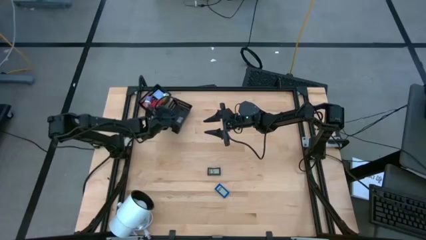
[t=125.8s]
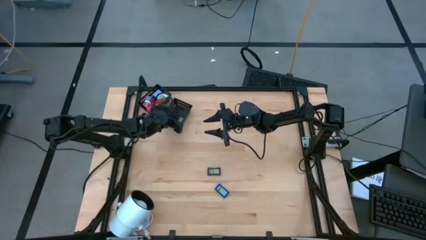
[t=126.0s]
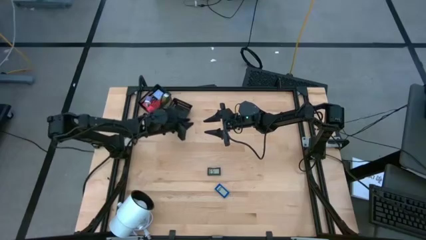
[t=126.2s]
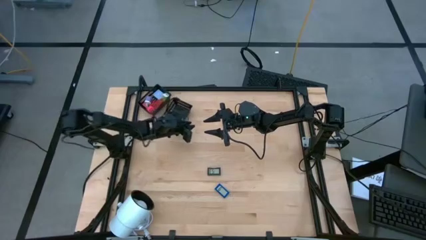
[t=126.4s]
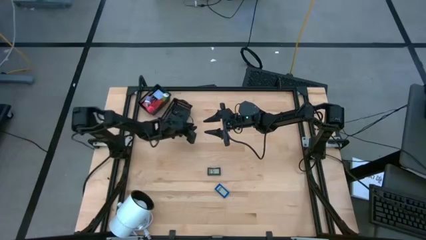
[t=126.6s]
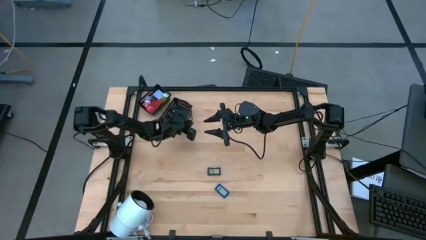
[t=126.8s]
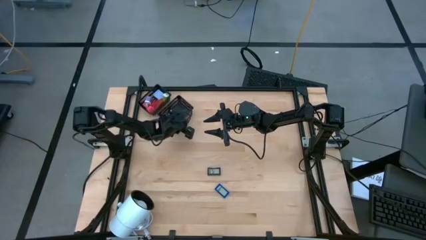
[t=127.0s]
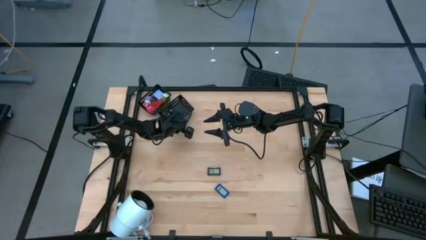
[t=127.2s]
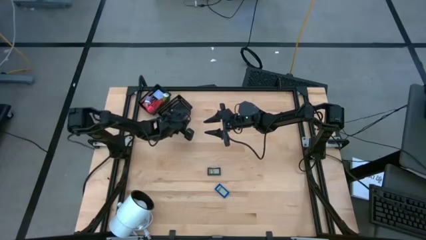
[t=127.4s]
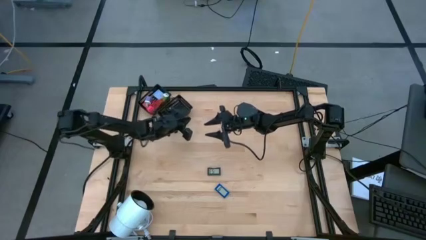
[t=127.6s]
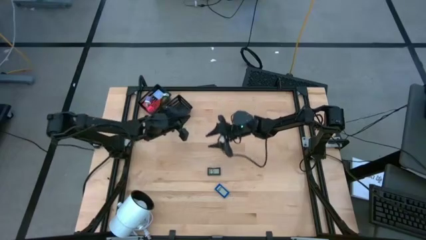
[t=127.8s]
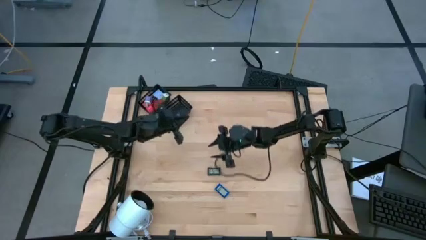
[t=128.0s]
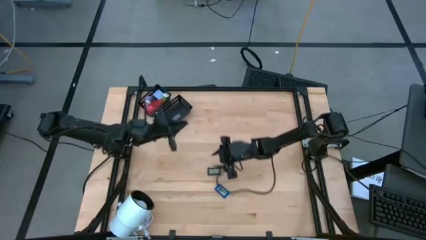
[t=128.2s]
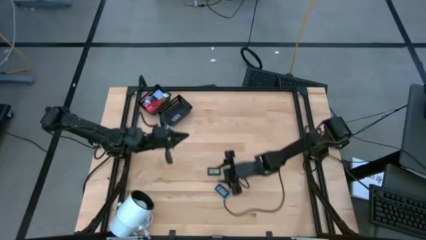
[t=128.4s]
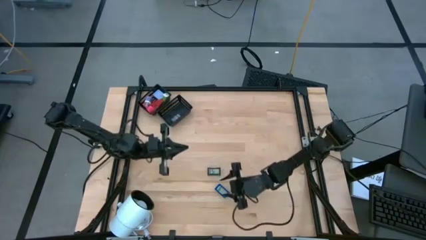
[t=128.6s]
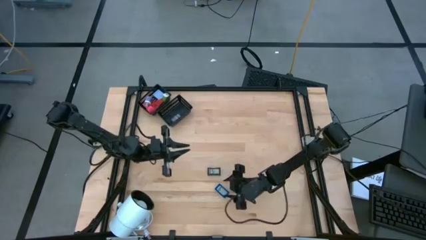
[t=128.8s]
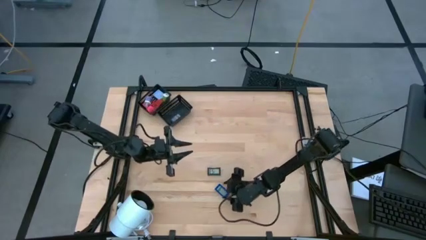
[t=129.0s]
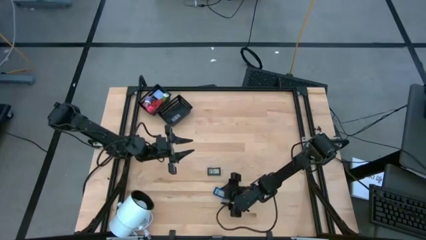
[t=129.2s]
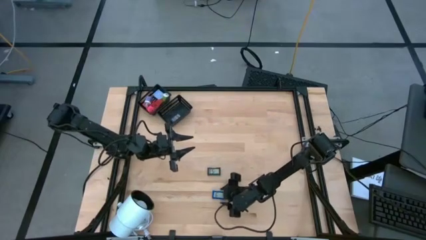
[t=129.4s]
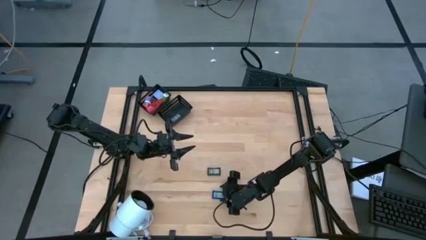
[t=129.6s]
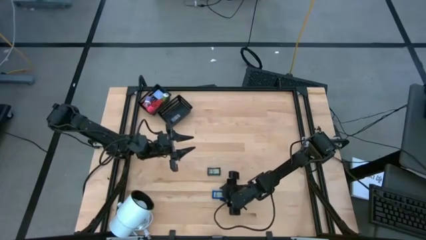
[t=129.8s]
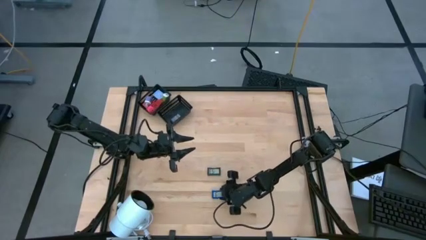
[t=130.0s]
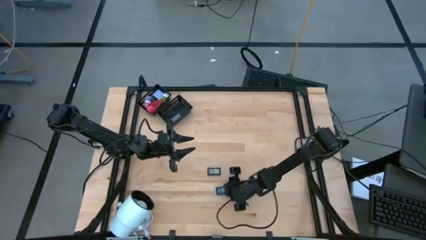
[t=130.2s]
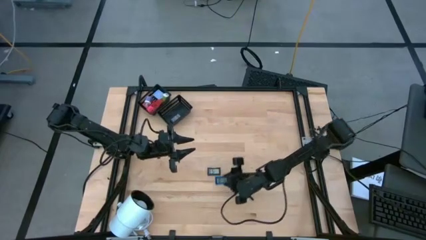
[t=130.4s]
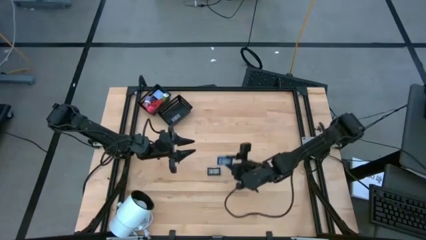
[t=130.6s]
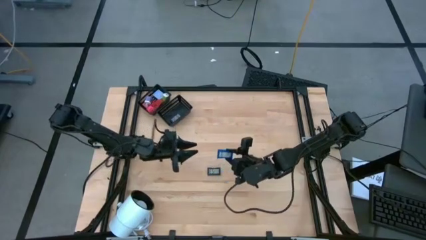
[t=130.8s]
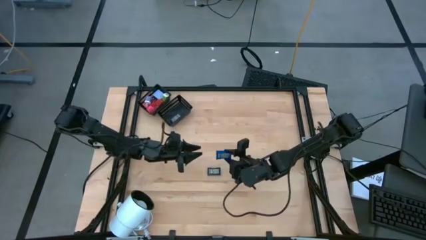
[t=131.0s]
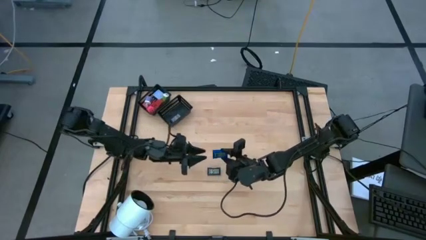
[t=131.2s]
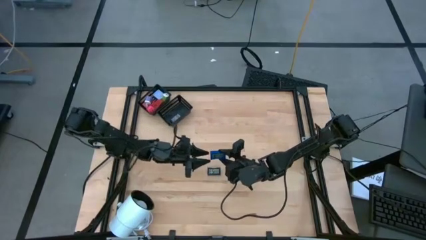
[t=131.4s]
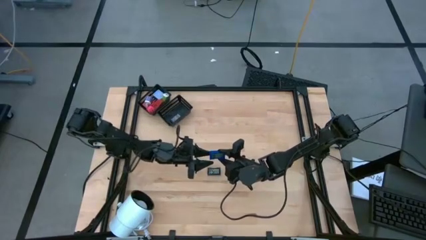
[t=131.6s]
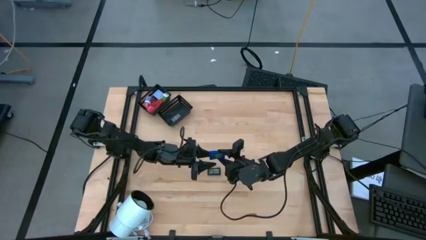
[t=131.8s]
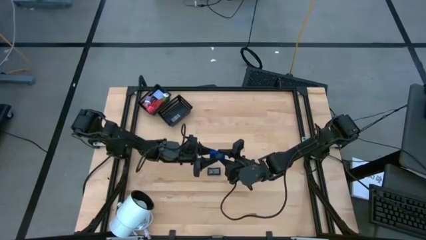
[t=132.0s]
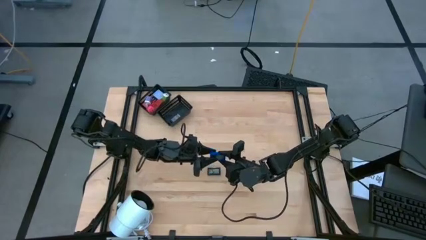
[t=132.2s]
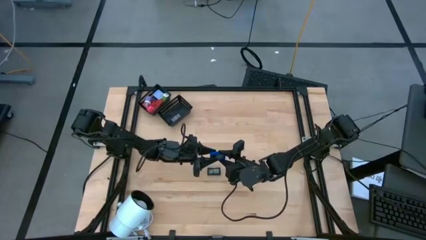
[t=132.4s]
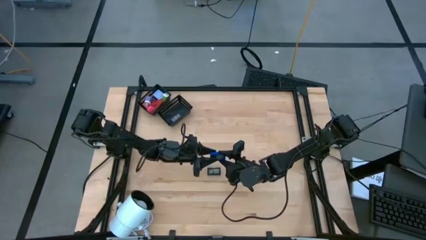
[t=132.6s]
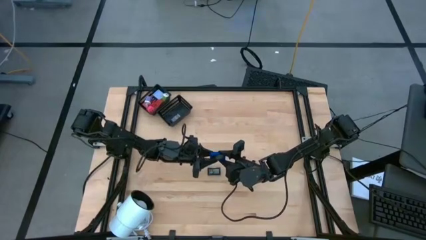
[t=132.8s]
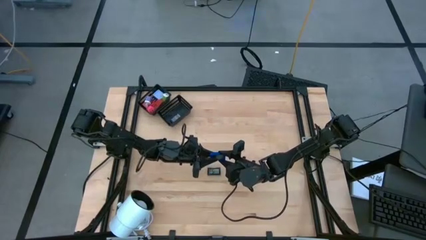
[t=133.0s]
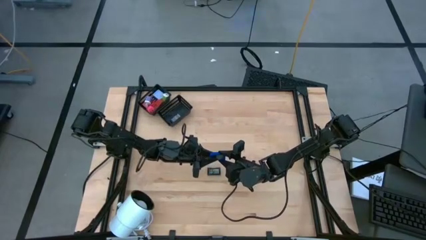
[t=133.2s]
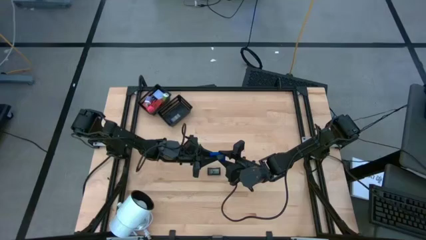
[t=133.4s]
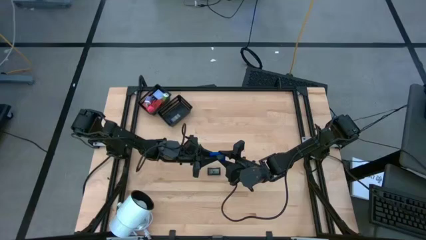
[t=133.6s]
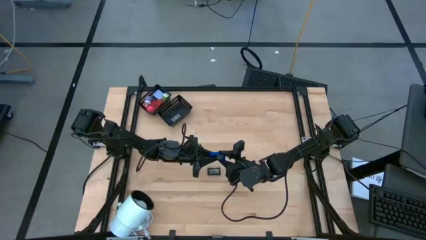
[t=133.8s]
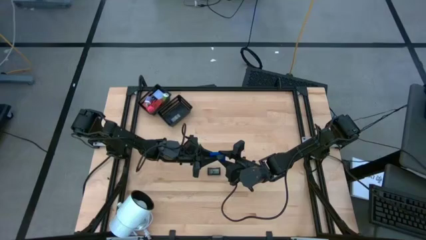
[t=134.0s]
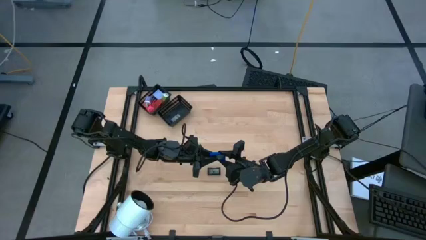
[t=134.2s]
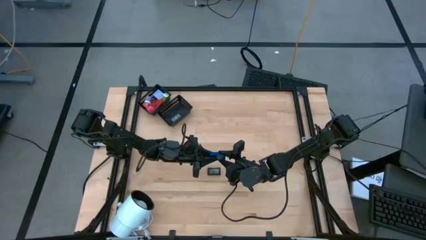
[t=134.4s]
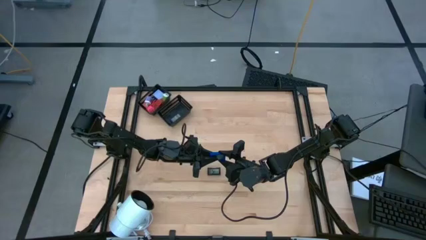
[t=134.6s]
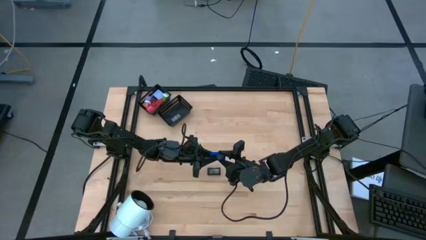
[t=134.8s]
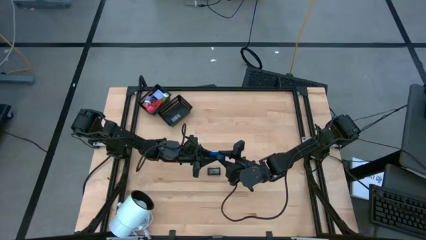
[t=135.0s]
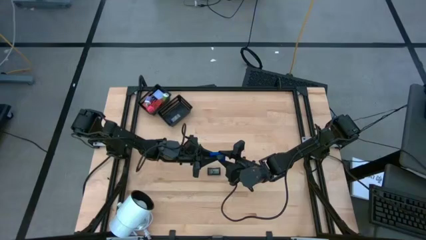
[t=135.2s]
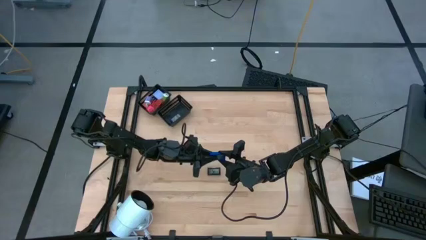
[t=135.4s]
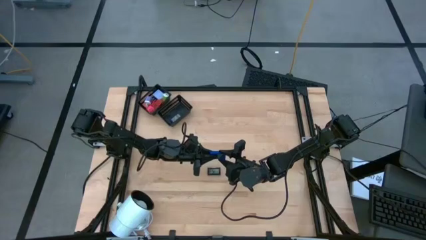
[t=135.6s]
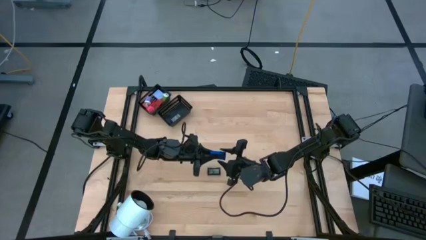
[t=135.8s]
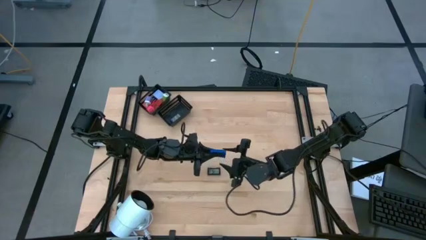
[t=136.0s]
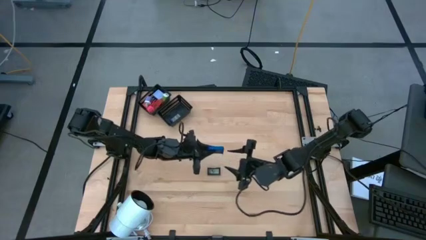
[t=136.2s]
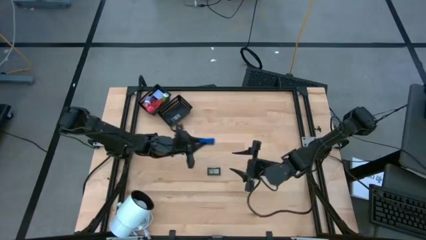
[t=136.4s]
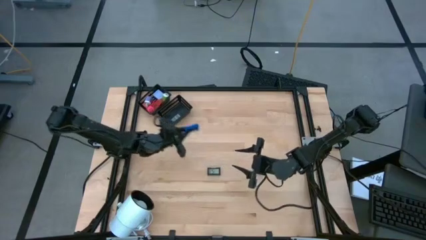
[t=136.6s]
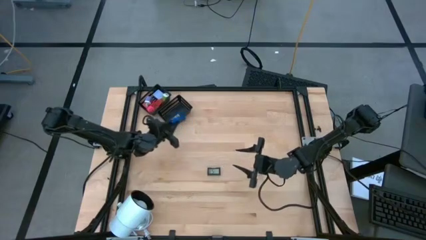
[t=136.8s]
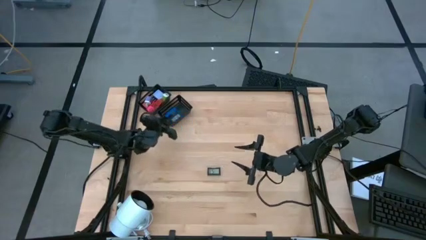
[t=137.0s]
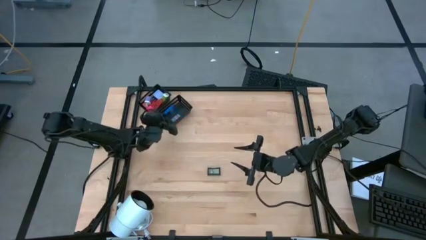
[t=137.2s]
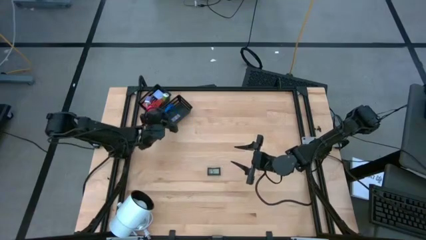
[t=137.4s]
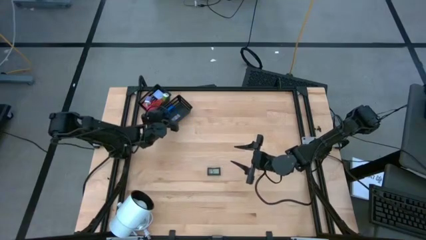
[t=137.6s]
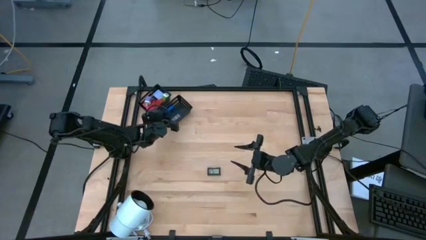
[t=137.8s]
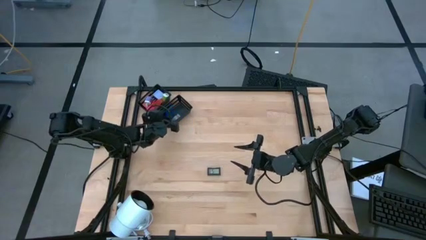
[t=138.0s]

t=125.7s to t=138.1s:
Task: Pick & Place Office items
Put the blue timer into the black bin

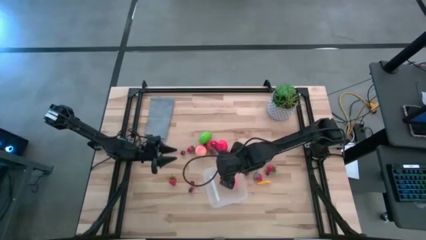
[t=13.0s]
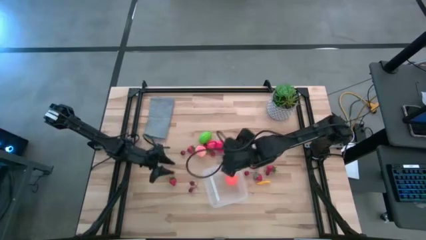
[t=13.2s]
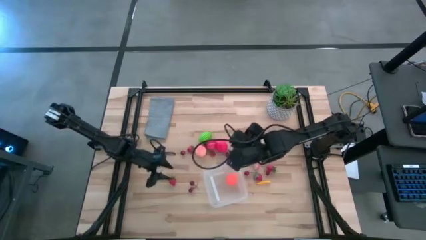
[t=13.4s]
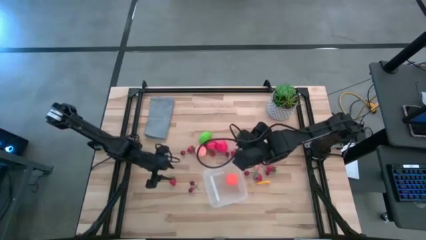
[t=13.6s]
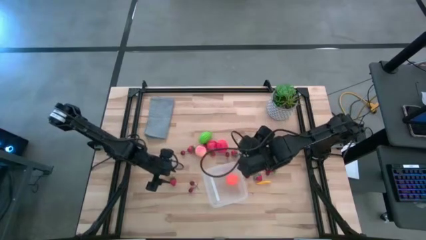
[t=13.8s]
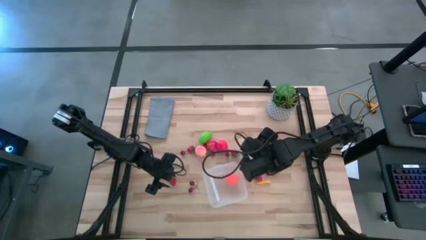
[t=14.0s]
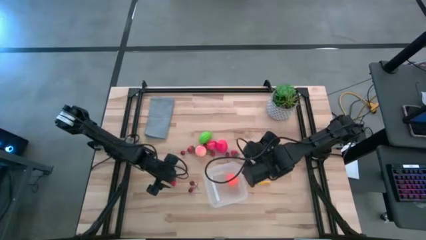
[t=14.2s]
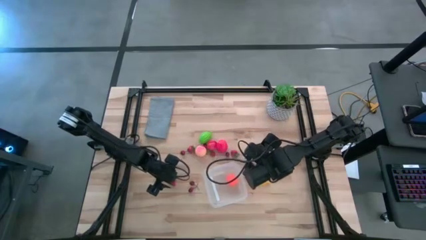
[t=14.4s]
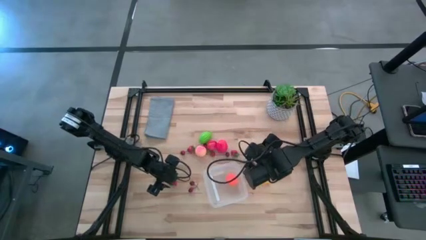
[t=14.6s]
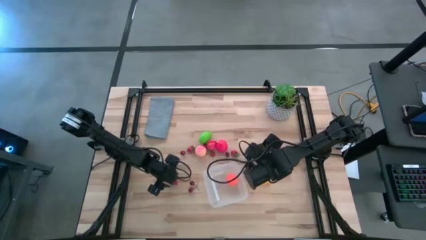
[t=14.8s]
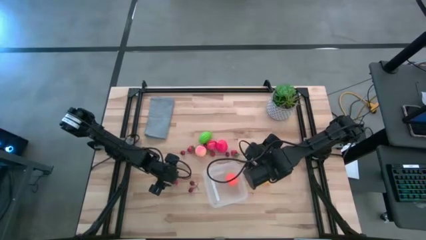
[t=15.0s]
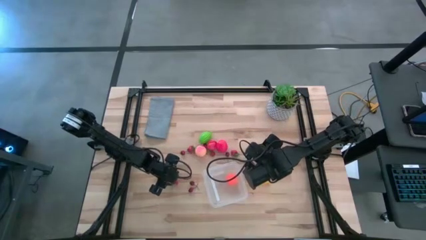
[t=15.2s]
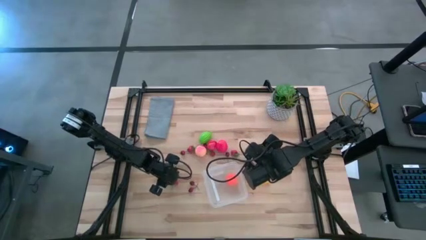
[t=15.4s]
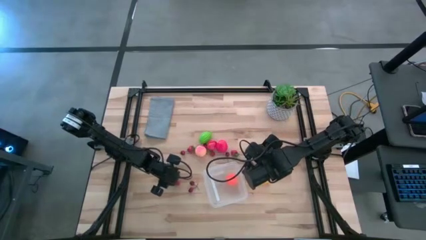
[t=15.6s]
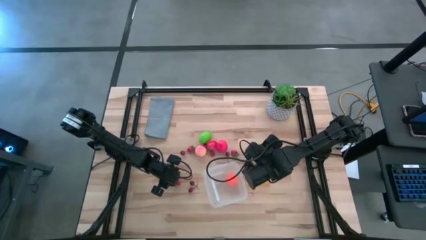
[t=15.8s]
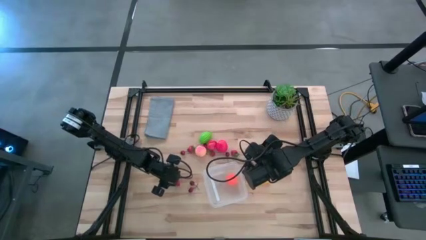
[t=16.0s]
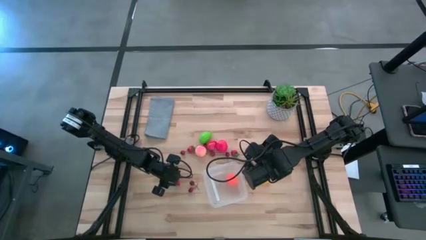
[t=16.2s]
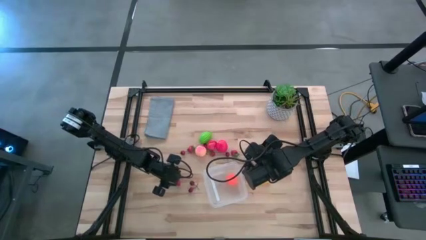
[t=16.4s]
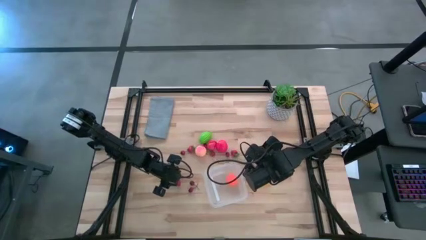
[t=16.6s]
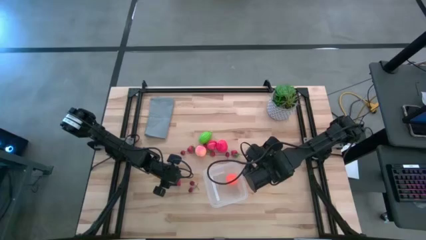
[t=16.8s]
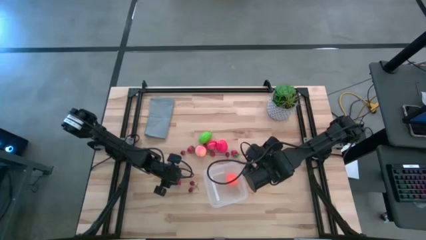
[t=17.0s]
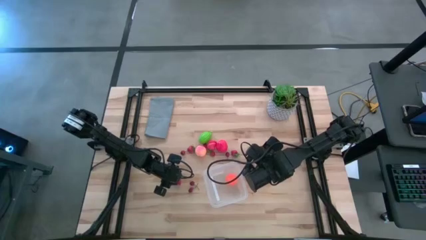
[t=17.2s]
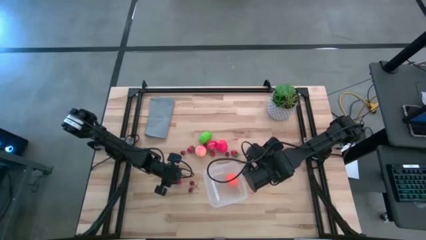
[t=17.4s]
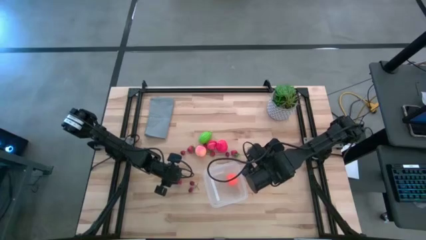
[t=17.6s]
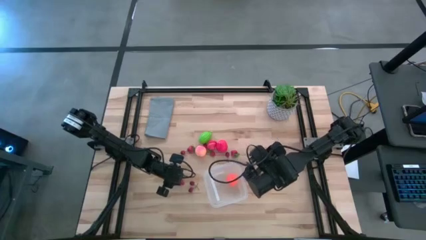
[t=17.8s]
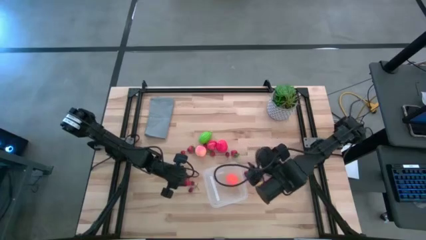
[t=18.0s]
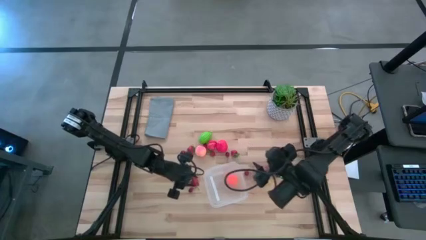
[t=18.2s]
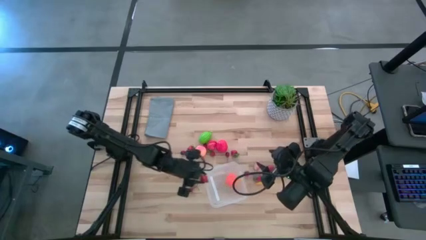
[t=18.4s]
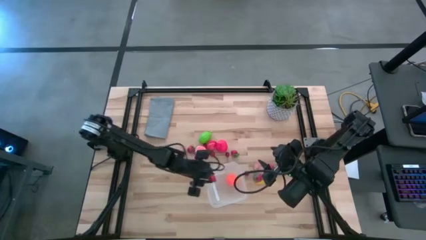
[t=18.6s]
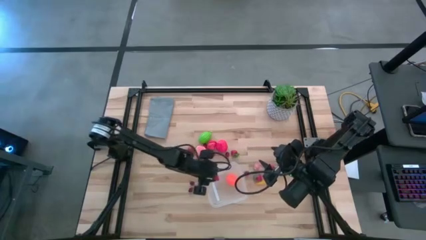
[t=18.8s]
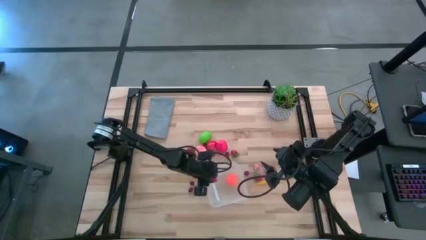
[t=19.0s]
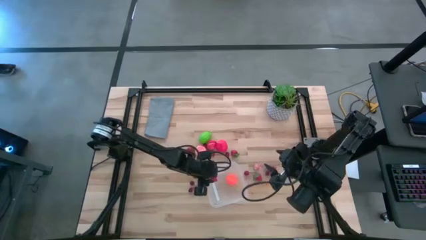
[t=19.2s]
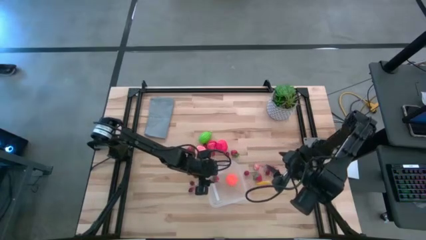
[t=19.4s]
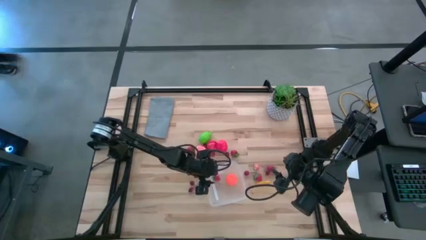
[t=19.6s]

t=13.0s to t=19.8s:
Task: Pick and placing Produce into tupperware
Put the red strawberry into the transparent bin
